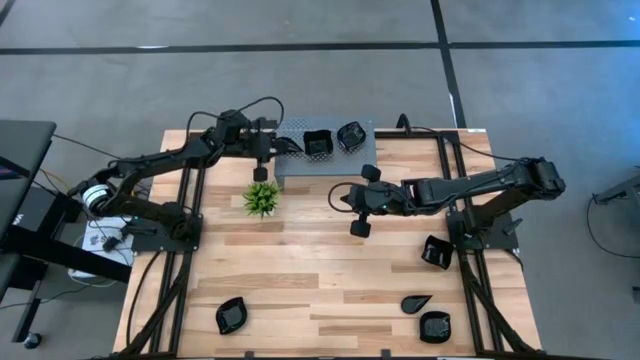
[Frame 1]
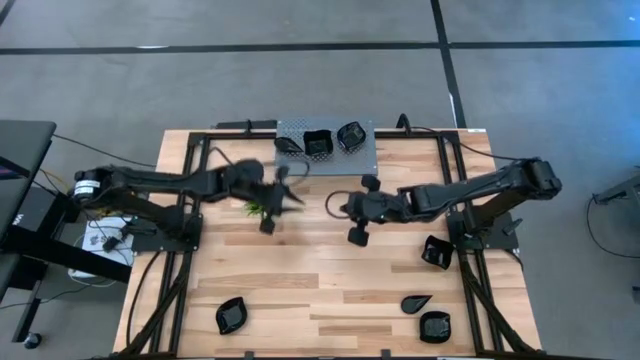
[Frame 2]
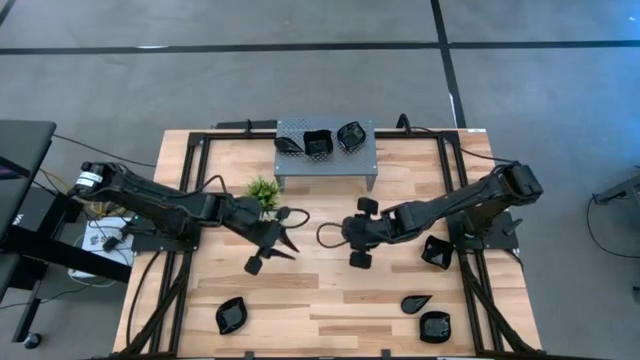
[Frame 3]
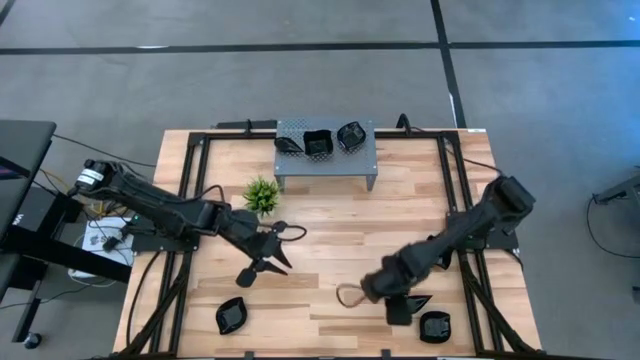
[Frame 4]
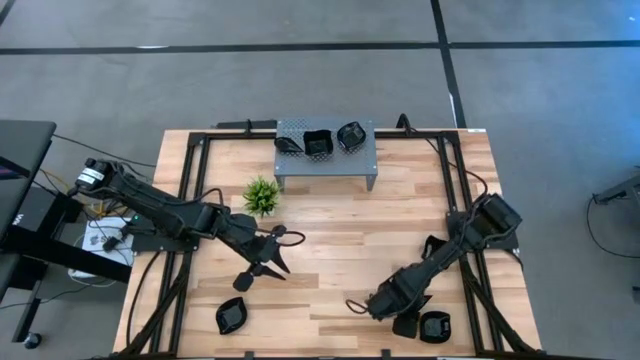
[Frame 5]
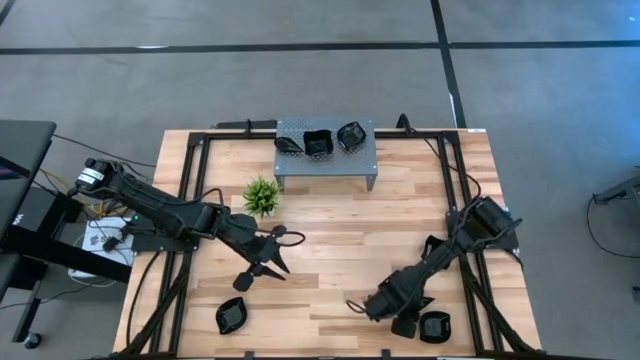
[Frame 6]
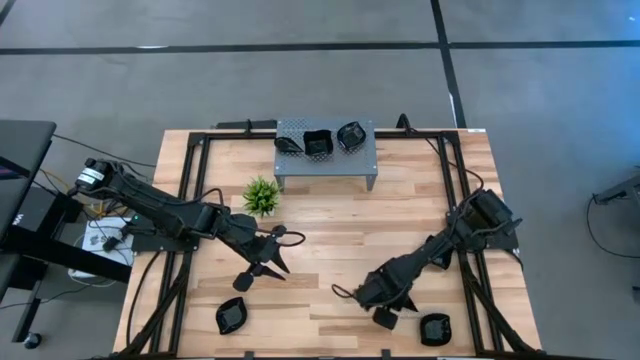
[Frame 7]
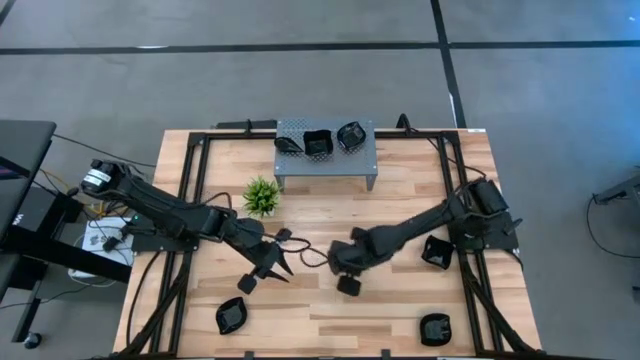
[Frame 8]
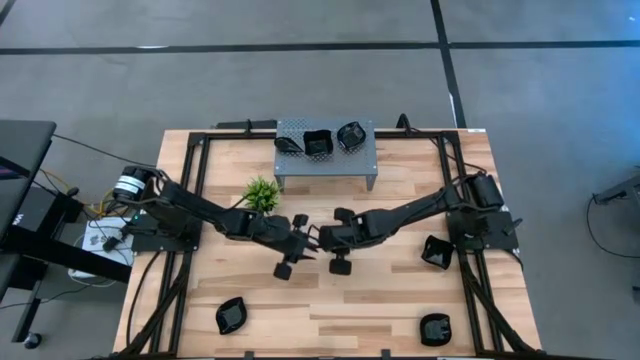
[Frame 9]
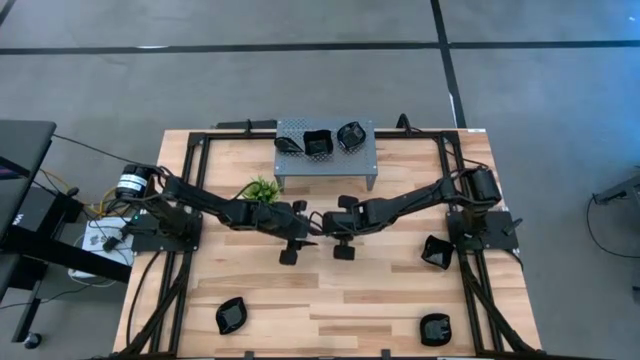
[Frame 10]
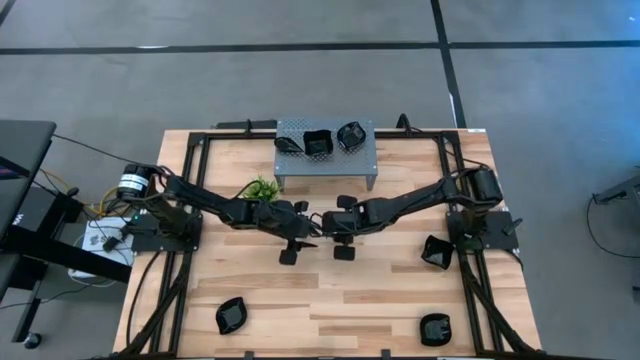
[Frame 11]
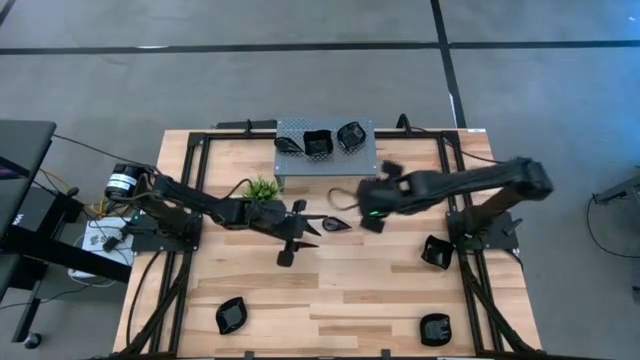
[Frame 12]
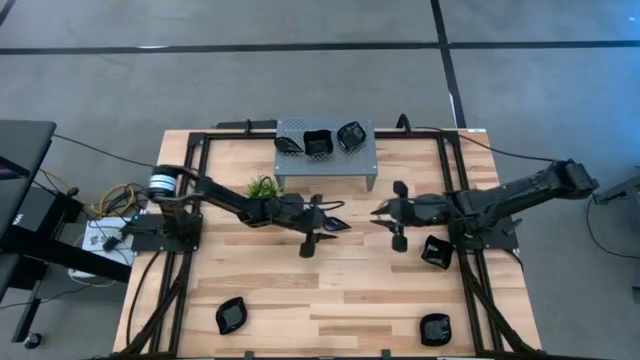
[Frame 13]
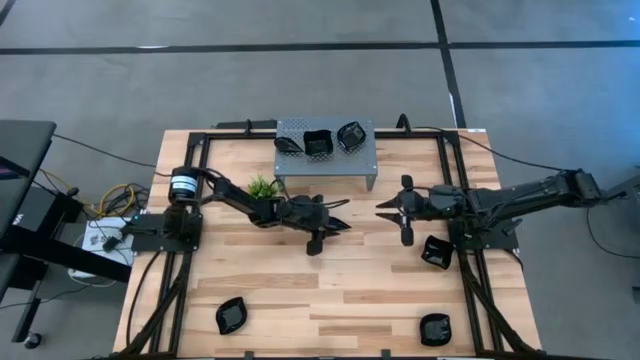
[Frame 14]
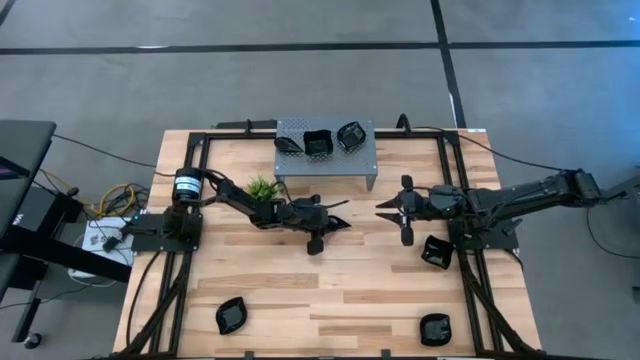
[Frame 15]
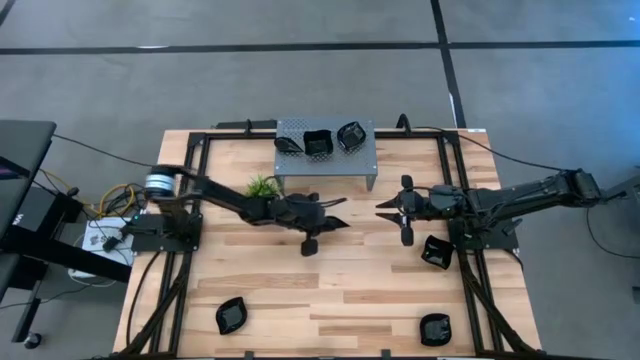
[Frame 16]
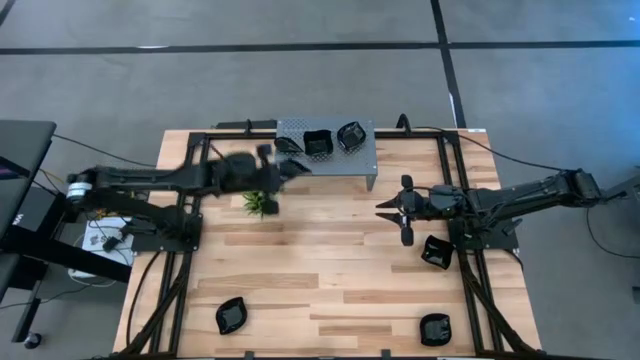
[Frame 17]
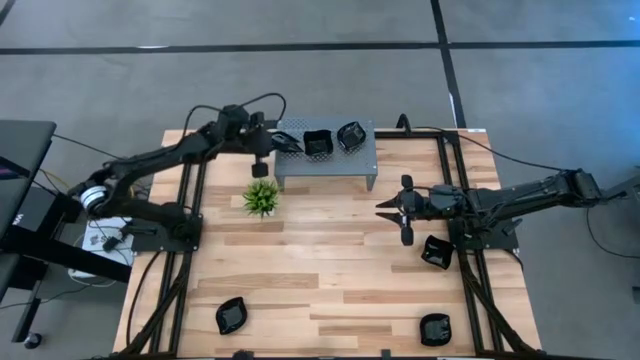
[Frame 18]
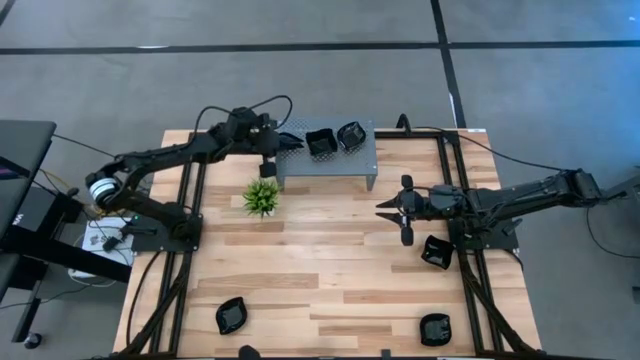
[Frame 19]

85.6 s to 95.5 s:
Task: Pick & Place Mini shaped plates
Stack the black drop-shaped plate on top of the black drop-shaped plate on the shelf

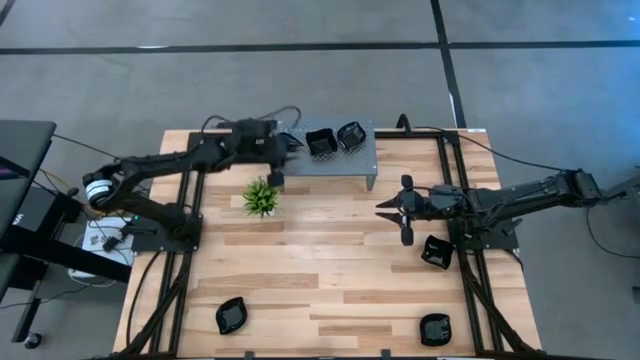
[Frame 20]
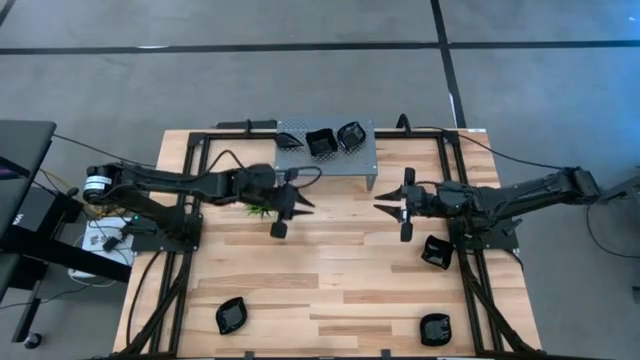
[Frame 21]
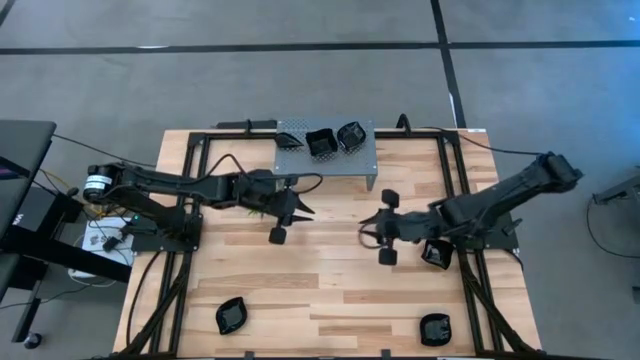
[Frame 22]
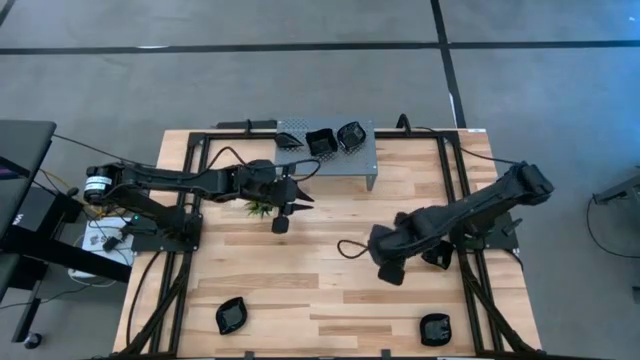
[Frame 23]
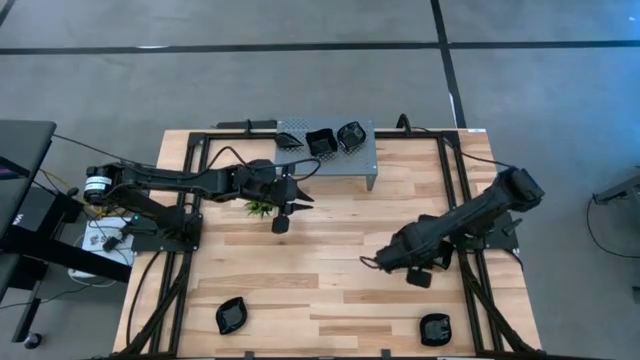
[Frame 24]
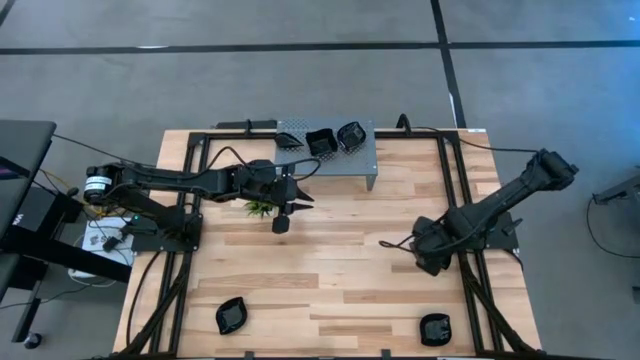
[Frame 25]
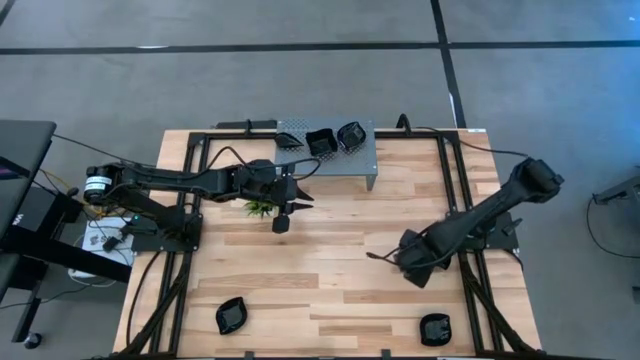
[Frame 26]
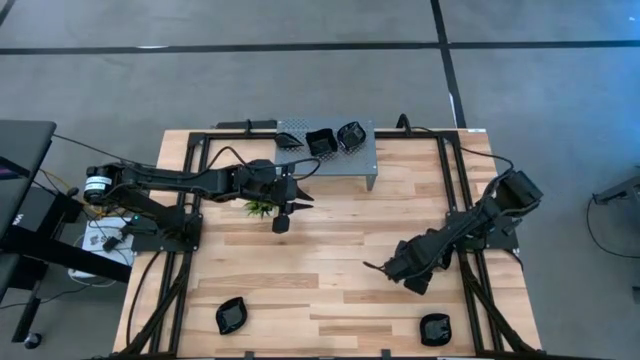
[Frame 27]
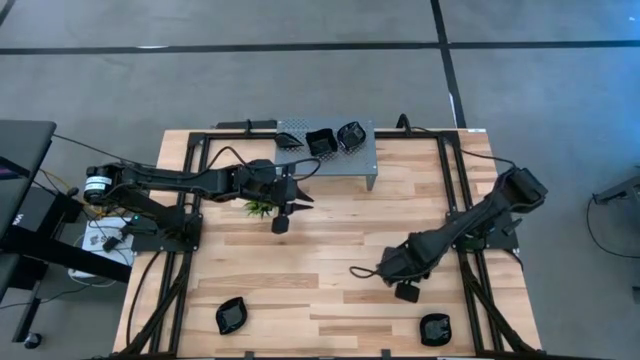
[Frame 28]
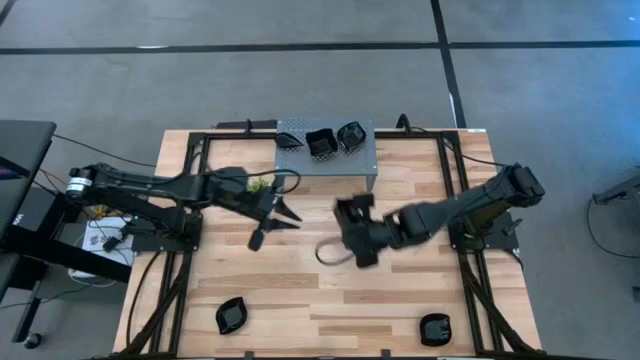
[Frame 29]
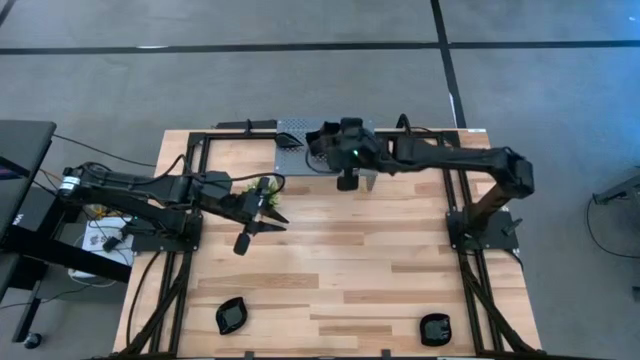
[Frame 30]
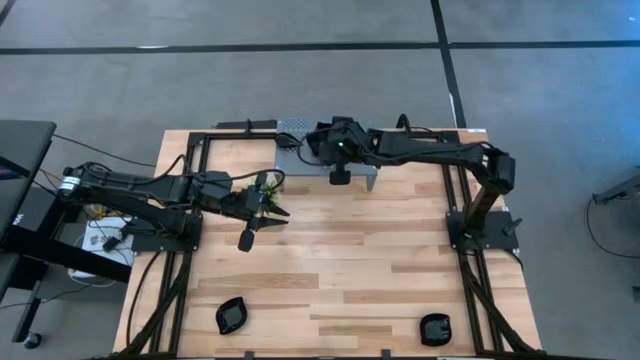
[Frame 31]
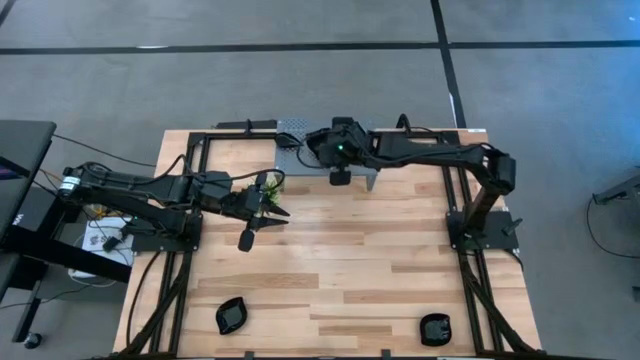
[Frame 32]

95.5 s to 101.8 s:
Stack the black distorted square plate on top of the black distorted square plate on the shelf

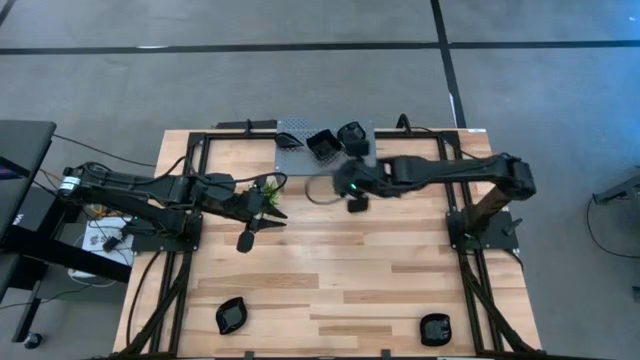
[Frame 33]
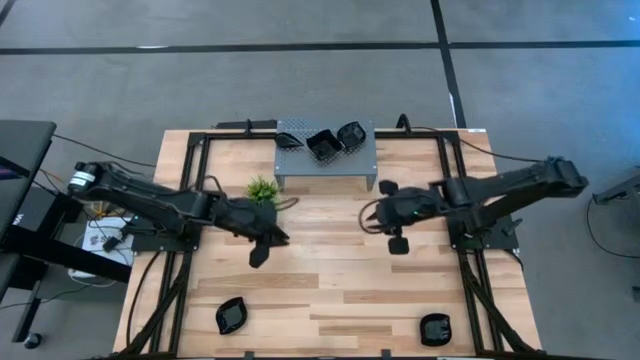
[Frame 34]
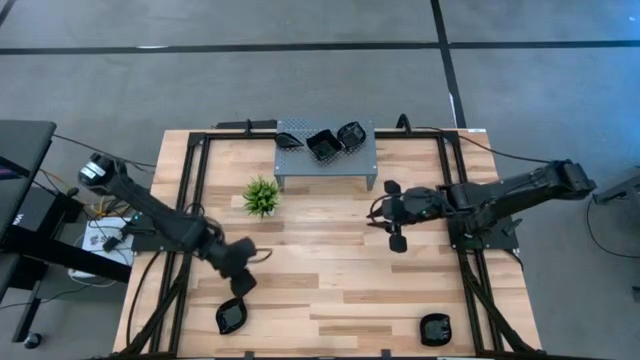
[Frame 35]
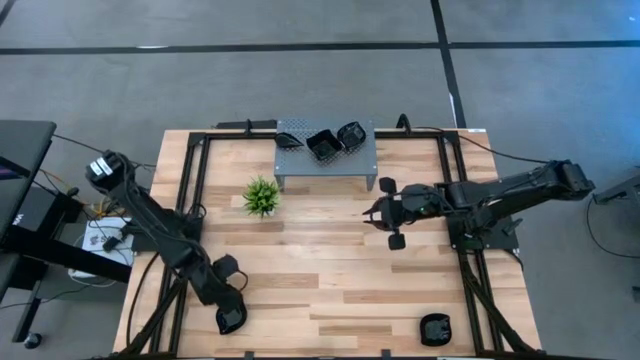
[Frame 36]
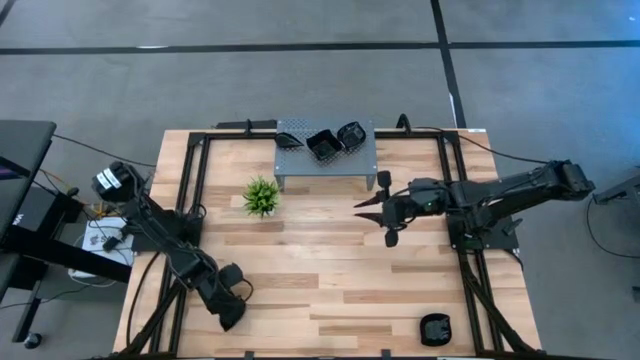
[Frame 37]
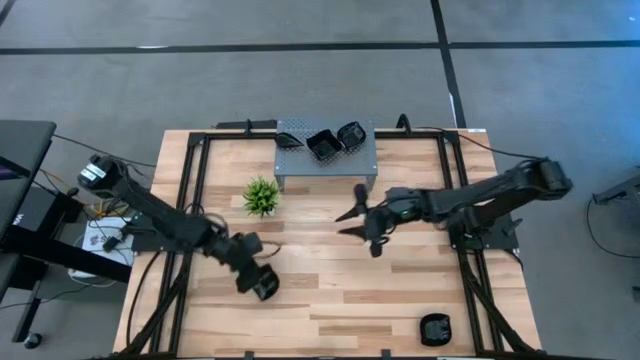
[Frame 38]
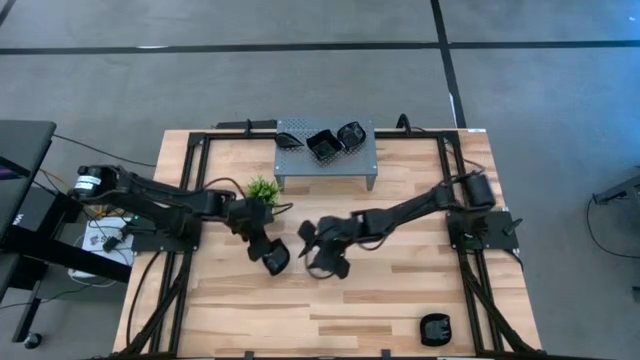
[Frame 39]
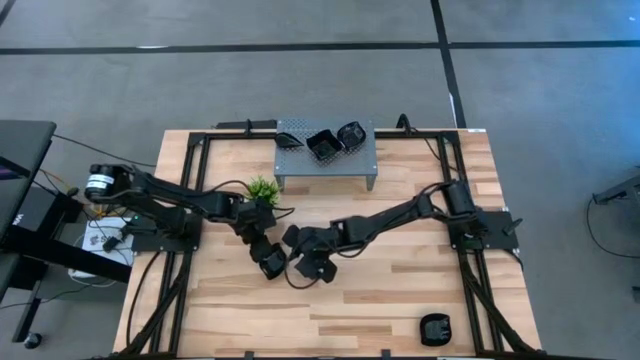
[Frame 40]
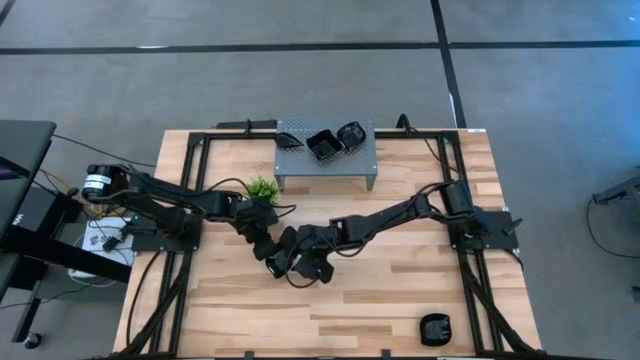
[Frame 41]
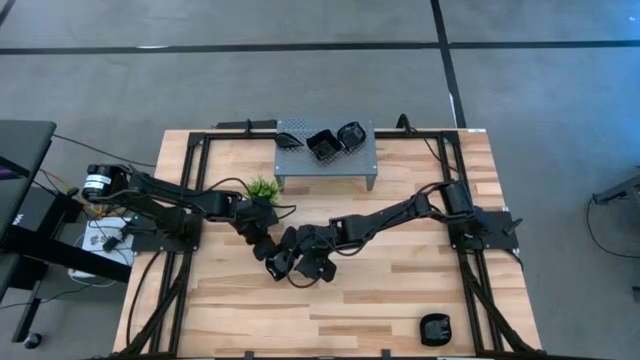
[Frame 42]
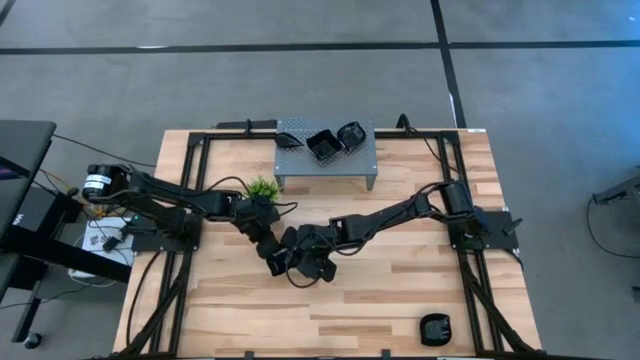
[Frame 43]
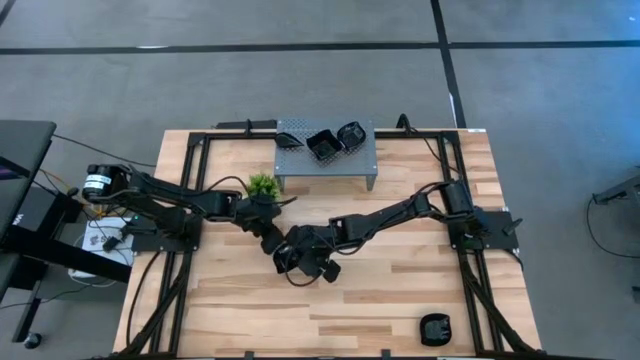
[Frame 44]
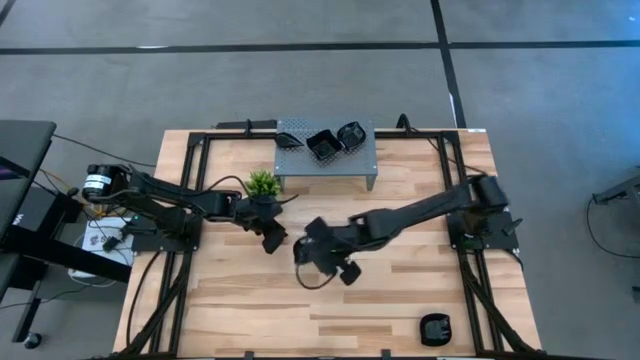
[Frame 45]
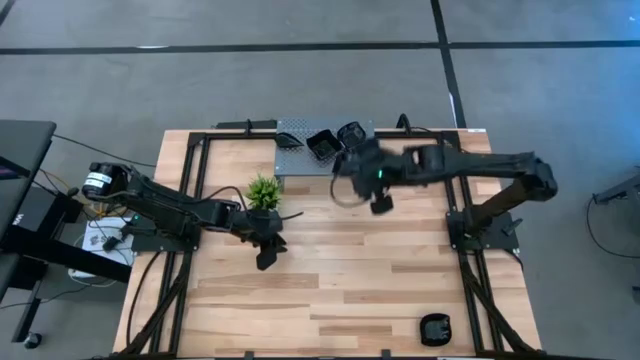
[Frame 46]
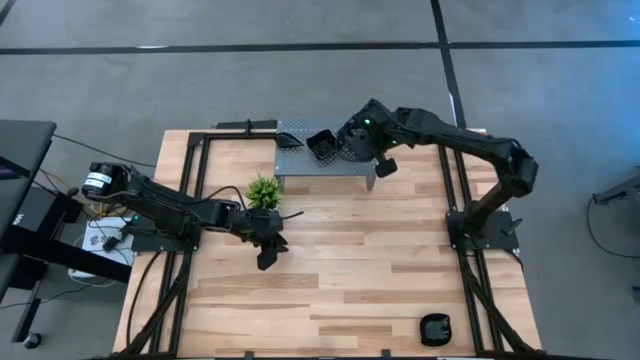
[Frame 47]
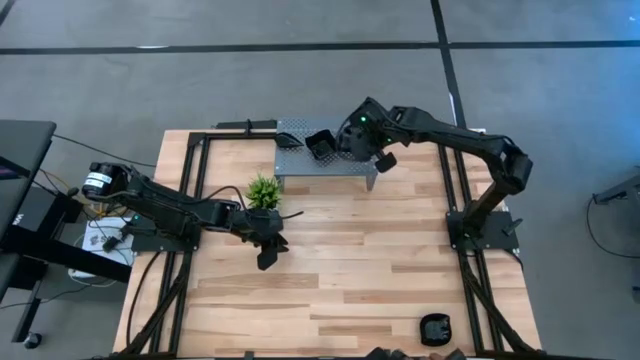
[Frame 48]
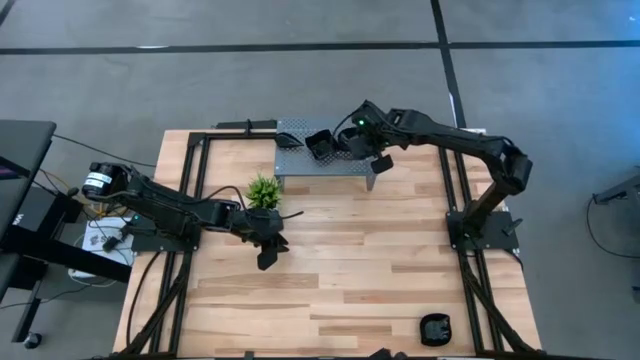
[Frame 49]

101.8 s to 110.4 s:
Stack the black leaf-shaped plate on top of the black leaf-shaped plate on the shelf
